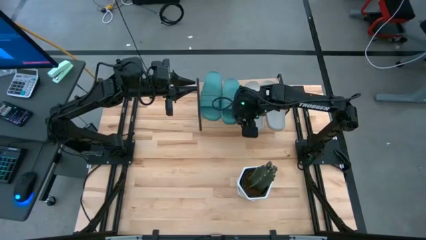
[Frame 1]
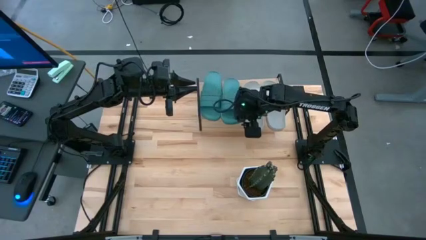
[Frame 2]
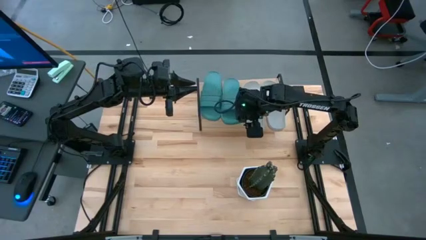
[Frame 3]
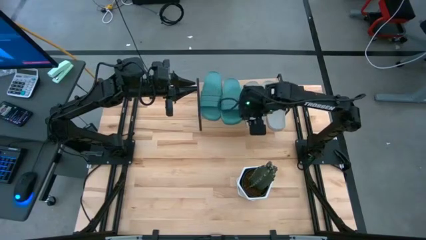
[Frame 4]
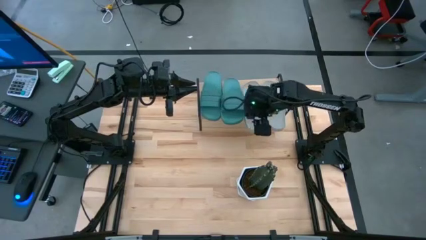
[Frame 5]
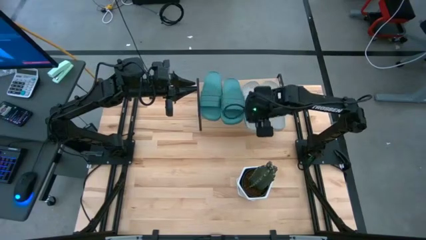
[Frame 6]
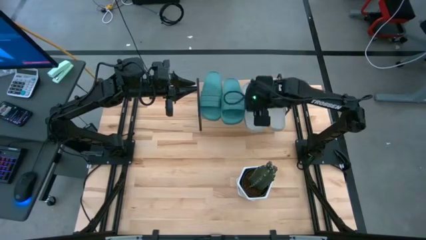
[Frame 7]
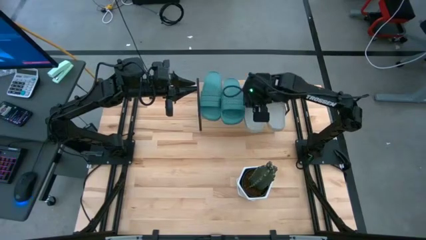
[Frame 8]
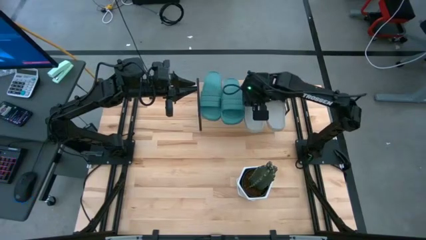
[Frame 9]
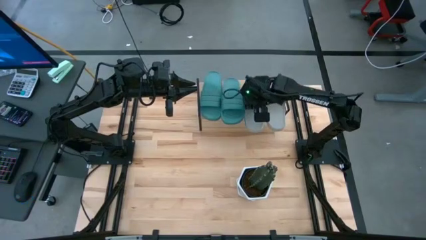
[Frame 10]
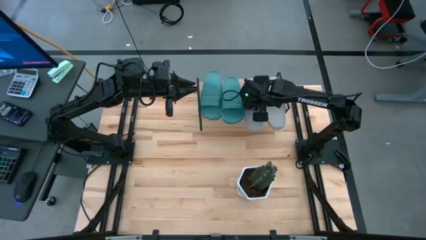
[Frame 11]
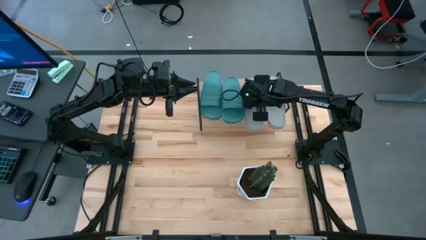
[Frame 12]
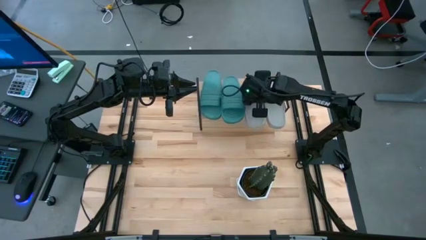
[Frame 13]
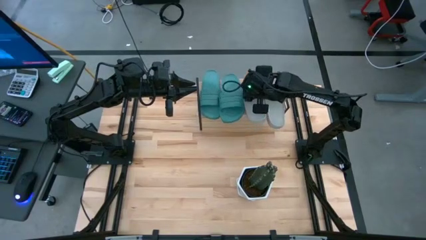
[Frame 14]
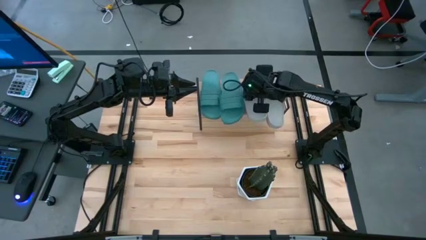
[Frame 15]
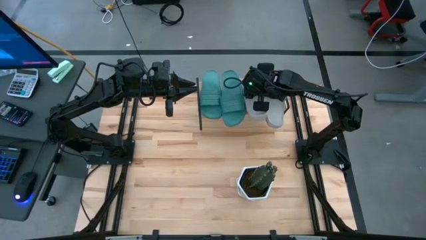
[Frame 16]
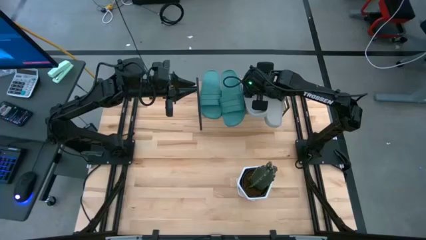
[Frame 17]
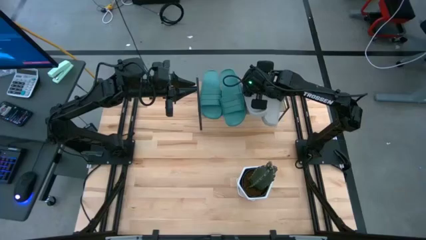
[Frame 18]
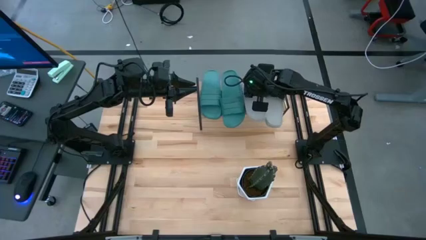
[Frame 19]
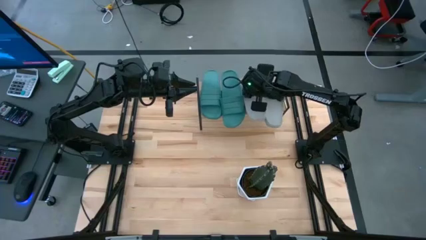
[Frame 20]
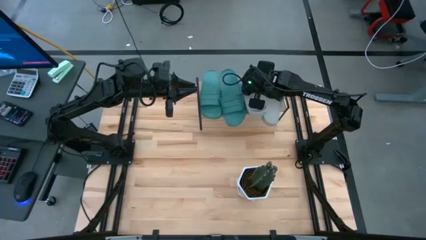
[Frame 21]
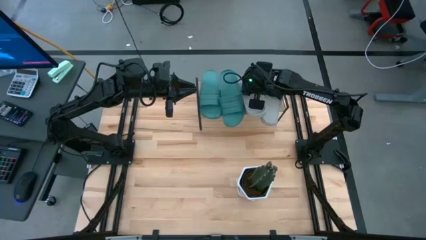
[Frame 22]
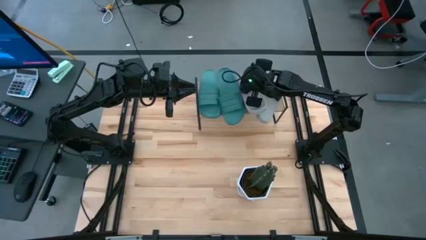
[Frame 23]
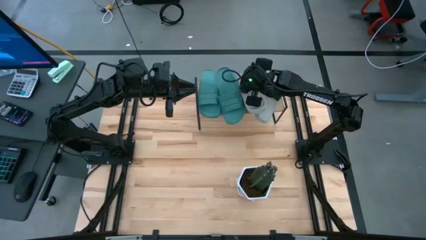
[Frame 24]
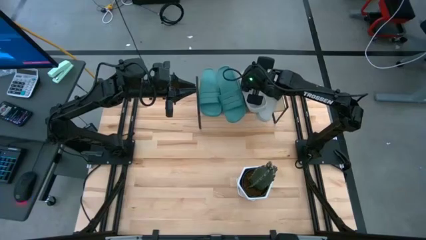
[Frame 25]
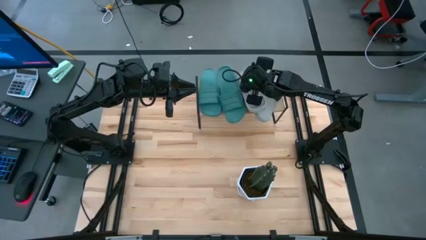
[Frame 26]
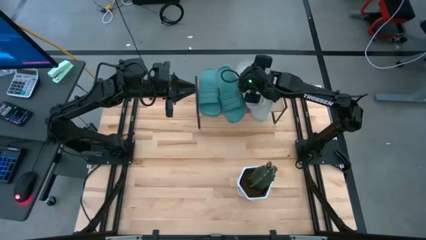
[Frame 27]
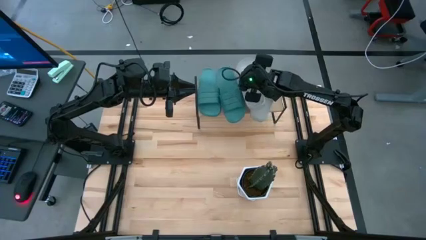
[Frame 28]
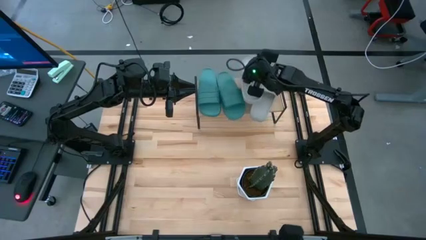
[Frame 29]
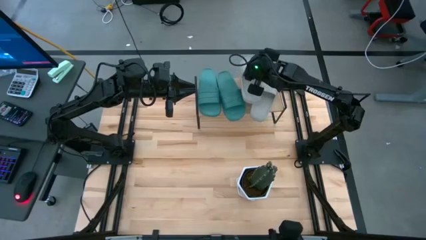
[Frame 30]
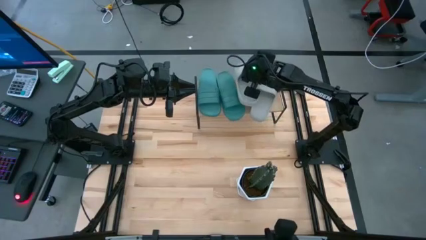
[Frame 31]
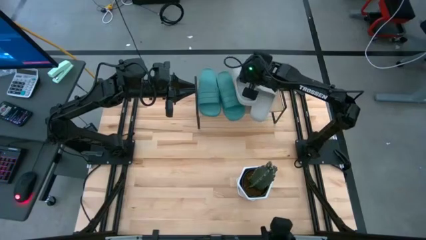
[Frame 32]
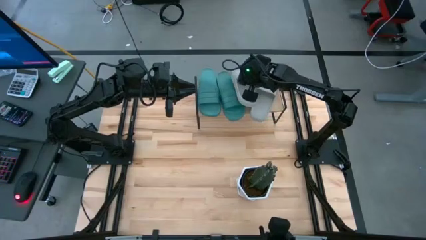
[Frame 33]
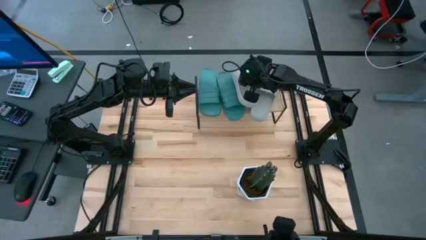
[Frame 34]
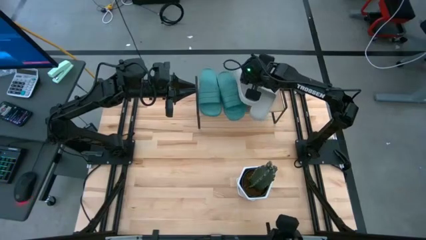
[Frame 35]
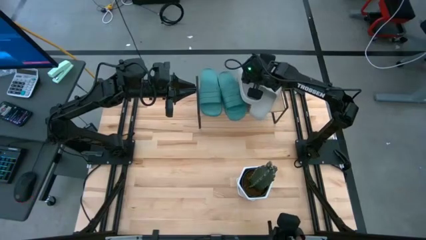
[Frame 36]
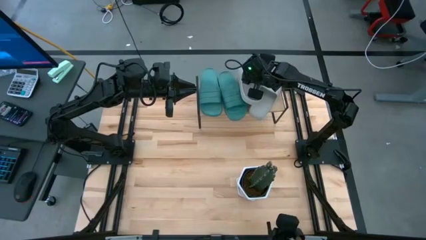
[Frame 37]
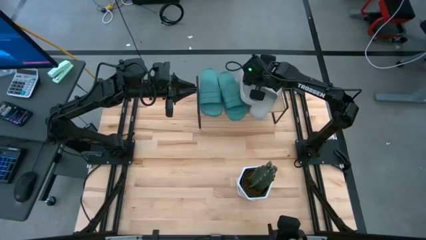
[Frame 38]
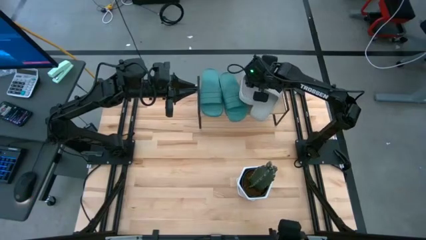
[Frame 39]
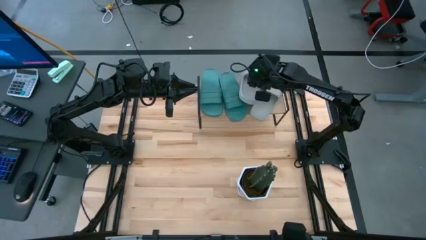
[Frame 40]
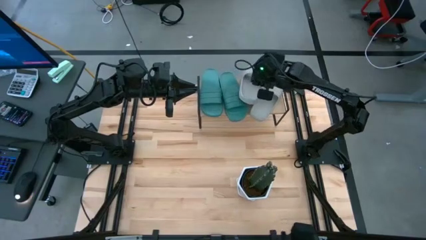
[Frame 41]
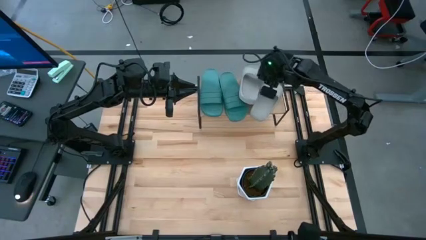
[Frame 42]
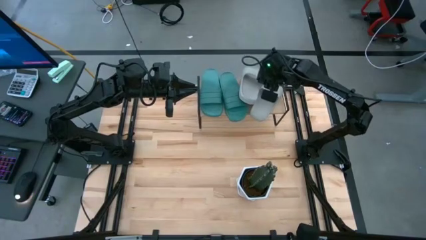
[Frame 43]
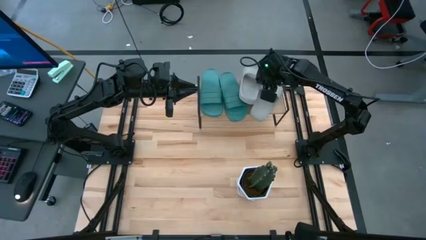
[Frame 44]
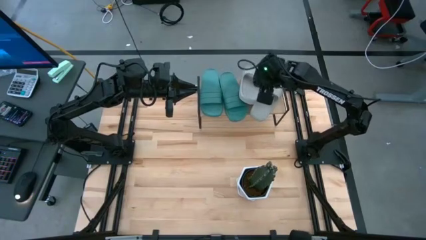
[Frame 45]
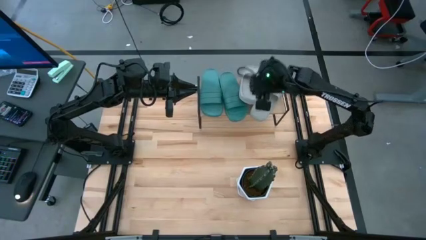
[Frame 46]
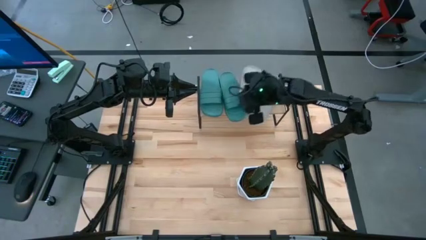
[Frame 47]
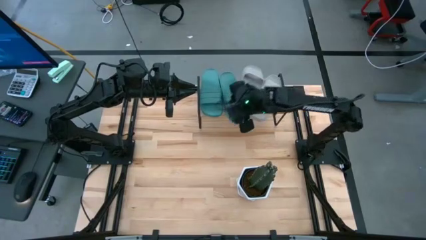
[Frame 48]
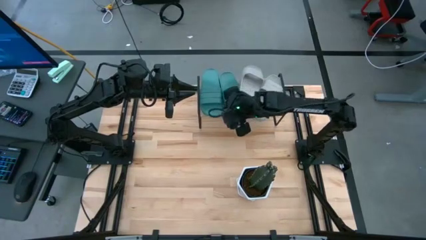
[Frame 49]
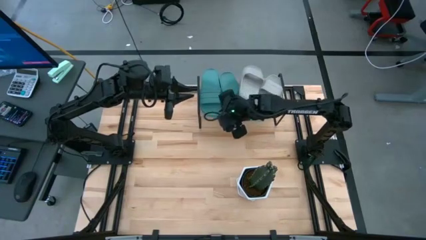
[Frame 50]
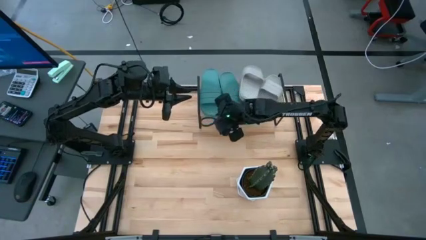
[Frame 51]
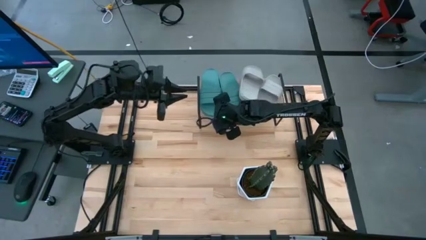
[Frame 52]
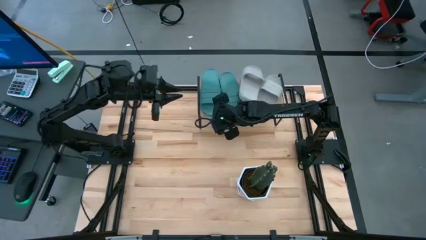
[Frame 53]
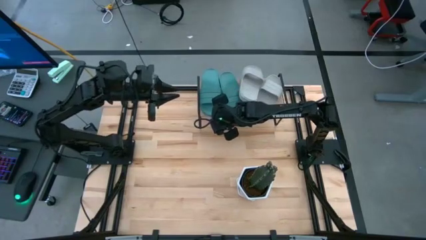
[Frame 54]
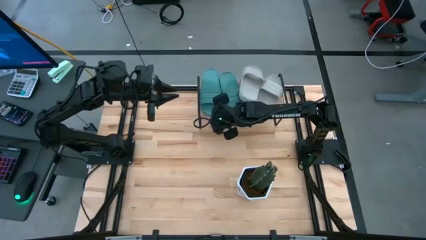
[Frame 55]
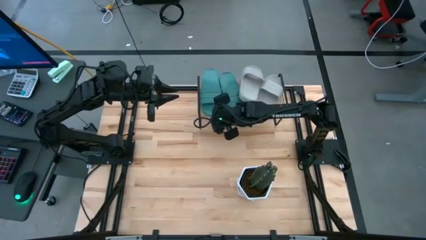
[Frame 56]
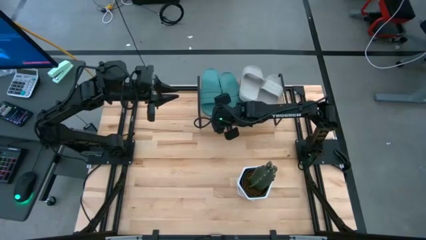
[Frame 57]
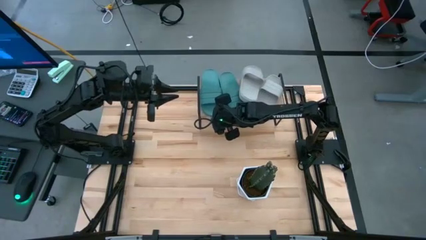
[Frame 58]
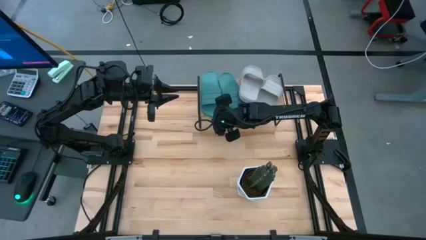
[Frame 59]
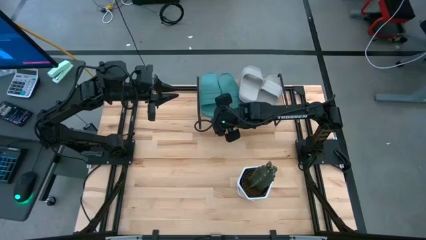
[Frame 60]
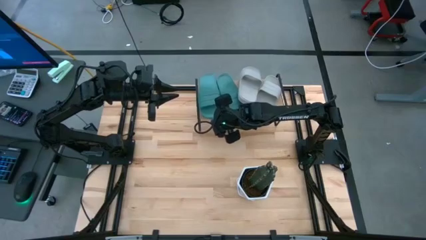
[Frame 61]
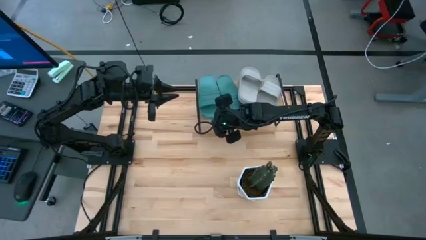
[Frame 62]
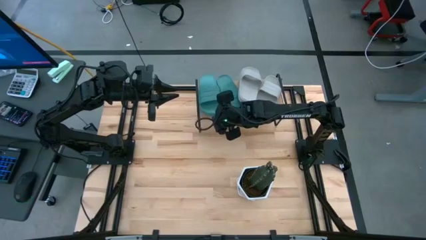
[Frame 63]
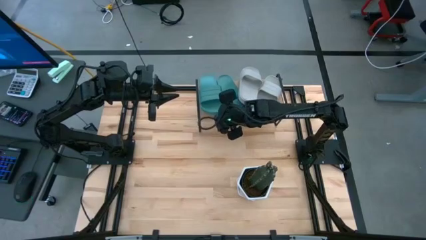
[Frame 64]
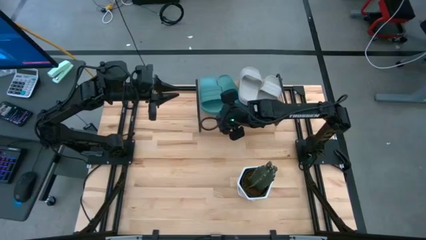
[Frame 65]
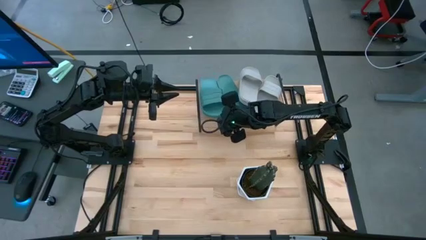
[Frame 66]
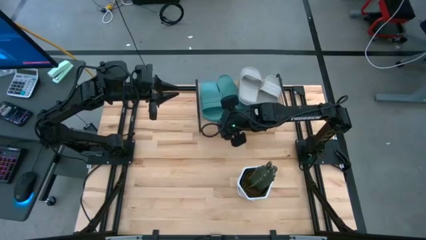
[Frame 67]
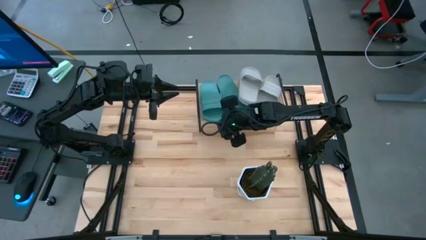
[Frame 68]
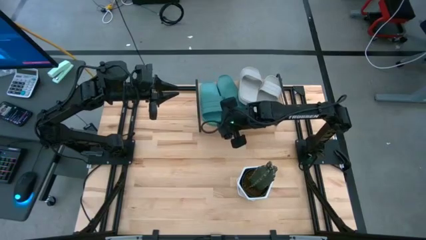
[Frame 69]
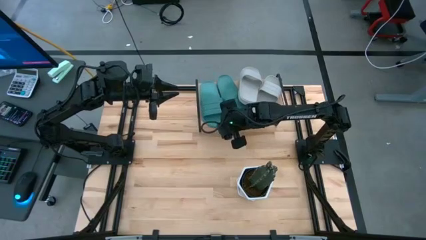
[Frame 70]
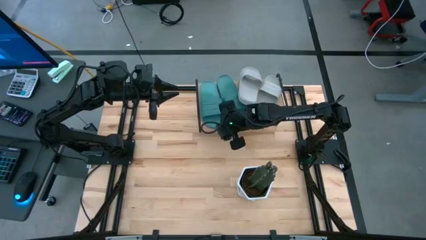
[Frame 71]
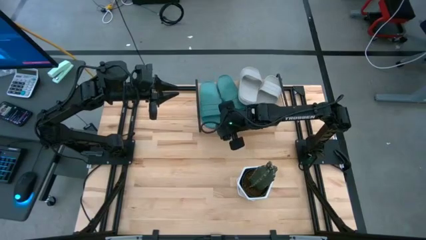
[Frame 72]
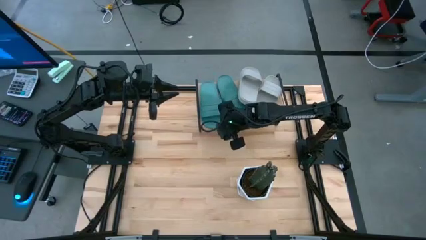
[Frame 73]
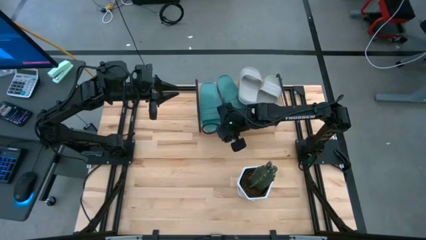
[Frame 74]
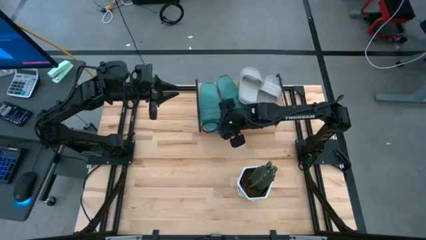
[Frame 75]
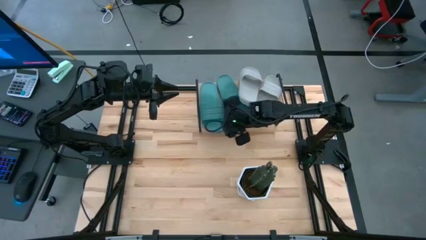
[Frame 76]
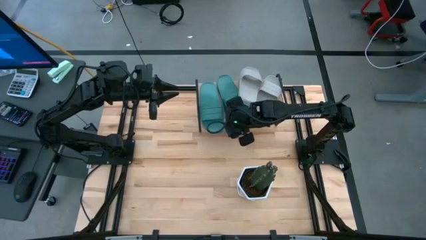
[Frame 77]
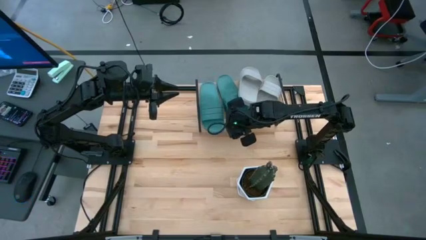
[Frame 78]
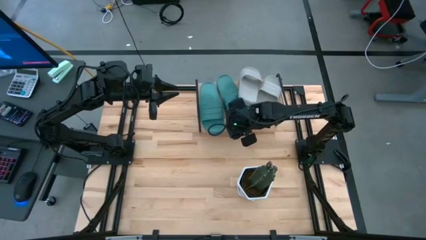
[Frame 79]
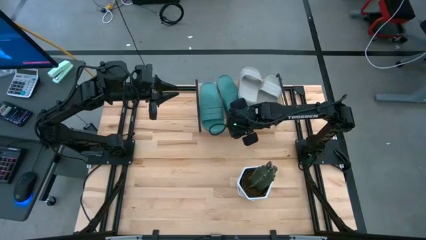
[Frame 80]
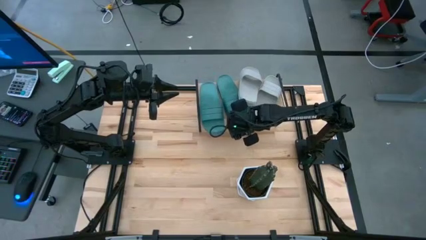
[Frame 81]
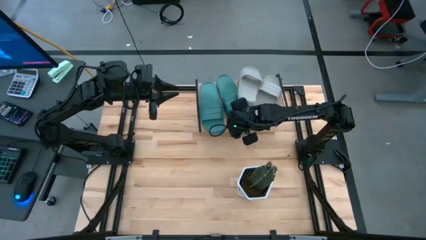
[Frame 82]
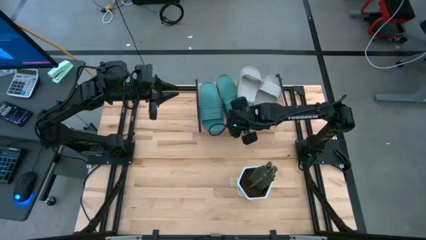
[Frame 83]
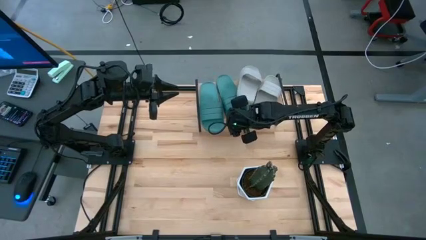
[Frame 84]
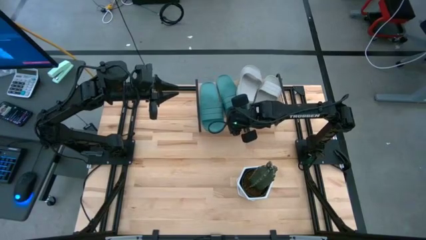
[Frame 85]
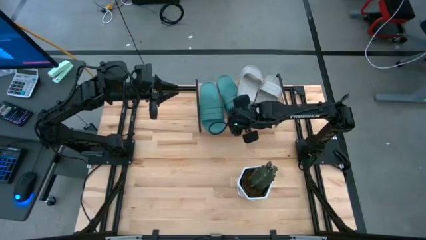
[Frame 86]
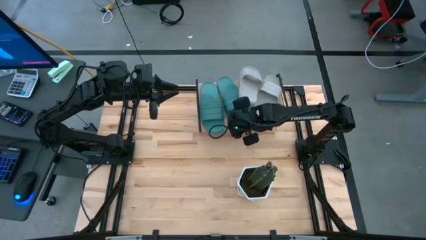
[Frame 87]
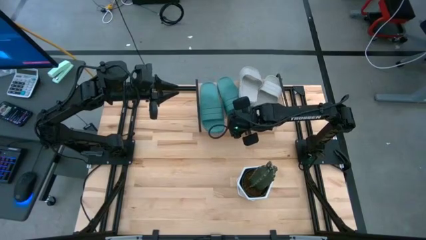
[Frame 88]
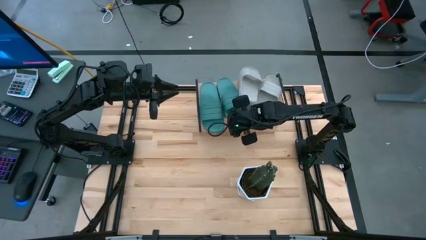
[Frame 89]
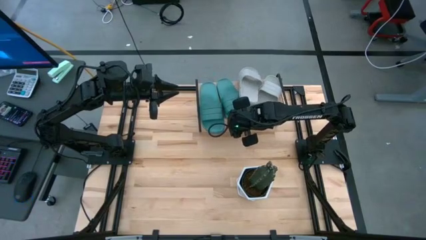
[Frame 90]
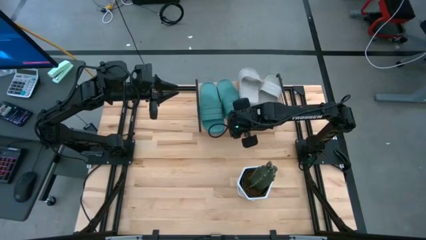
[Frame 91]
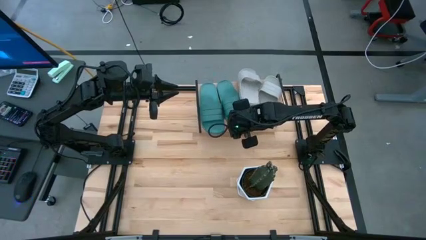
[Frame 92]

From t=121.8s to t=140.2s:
Task: Pick and place slides into the shelf
Adjust the slippers on the shelf
